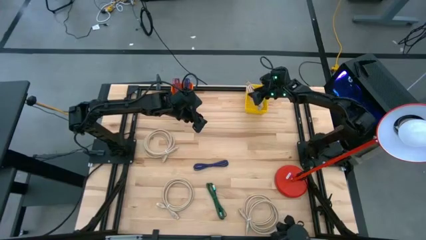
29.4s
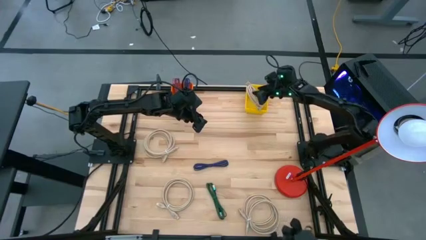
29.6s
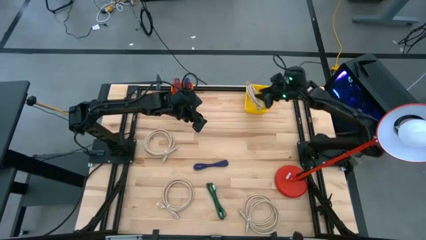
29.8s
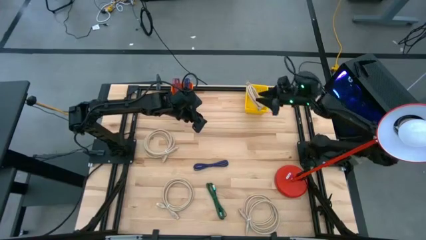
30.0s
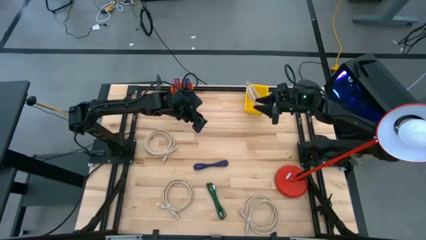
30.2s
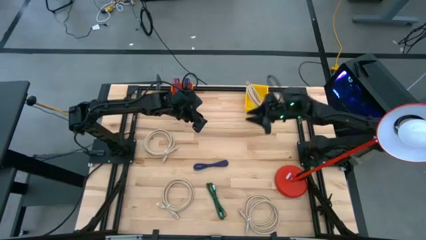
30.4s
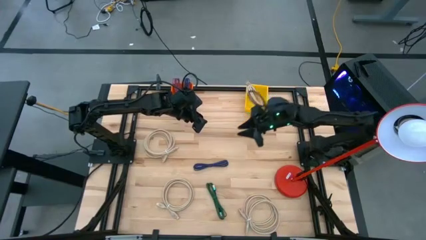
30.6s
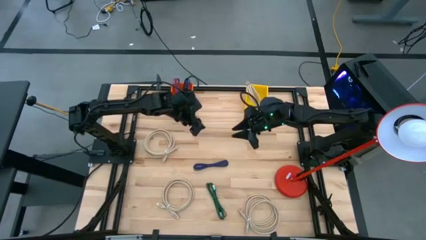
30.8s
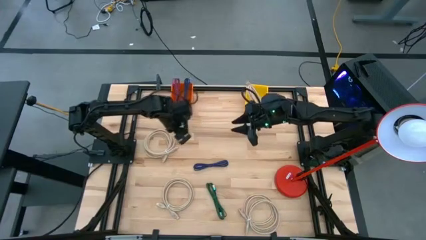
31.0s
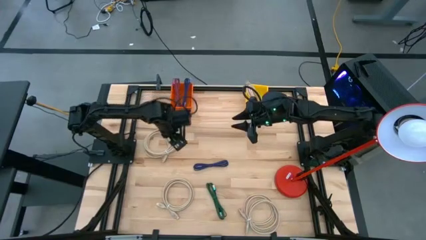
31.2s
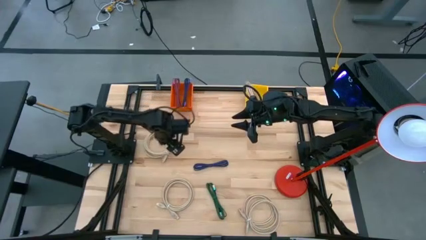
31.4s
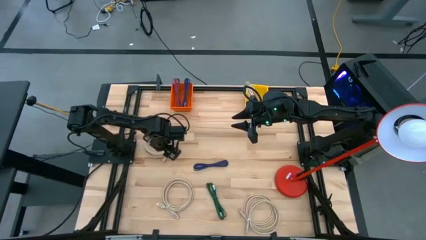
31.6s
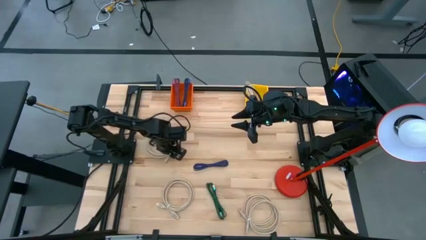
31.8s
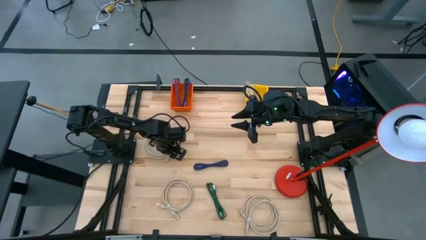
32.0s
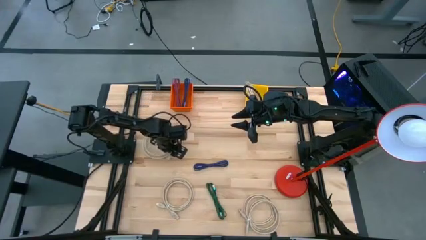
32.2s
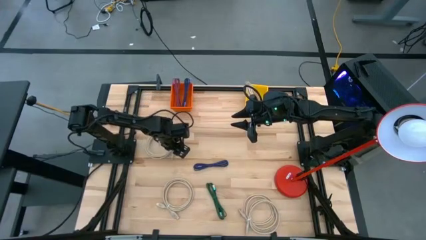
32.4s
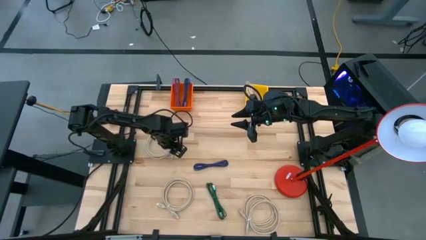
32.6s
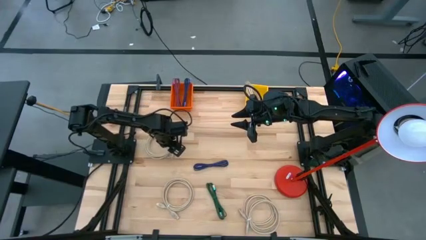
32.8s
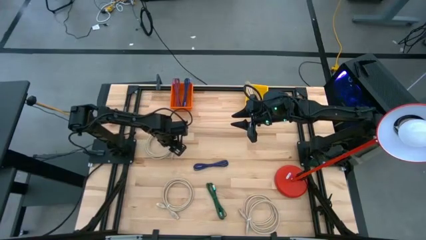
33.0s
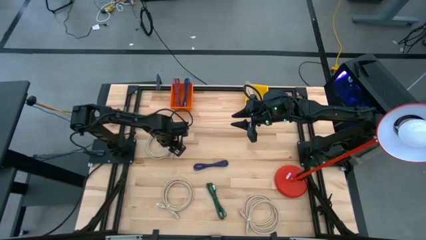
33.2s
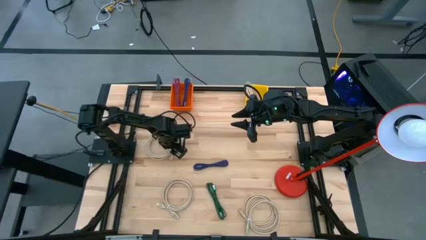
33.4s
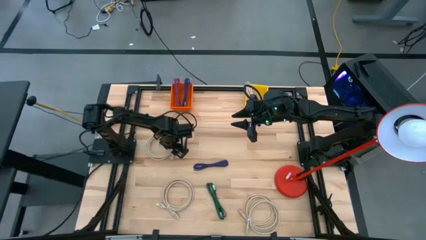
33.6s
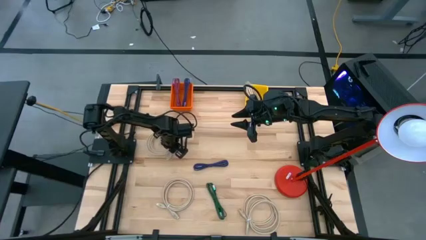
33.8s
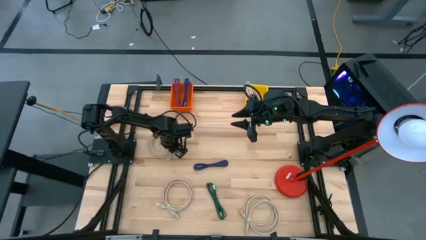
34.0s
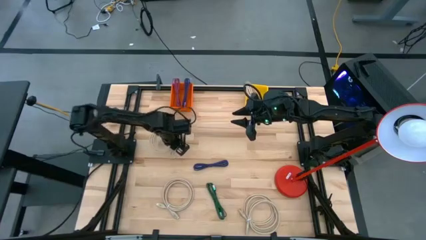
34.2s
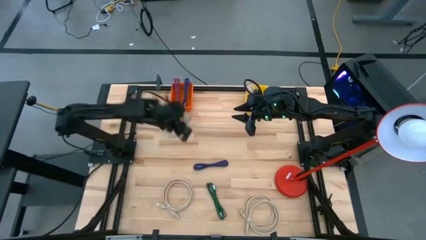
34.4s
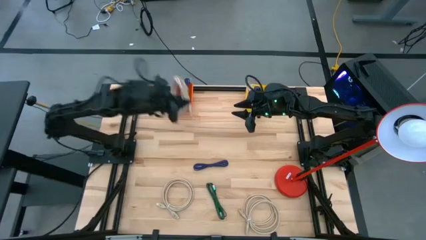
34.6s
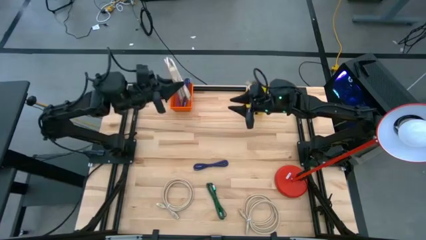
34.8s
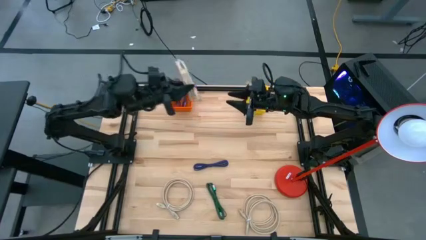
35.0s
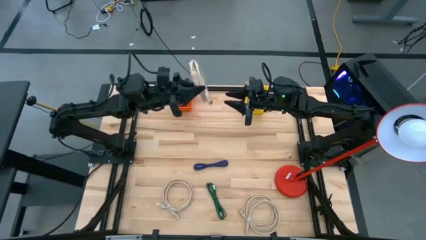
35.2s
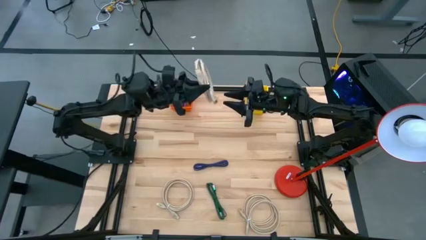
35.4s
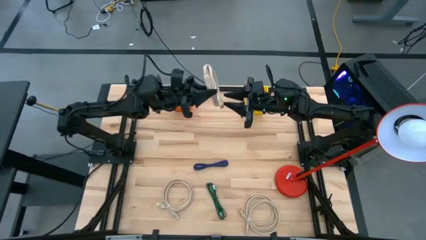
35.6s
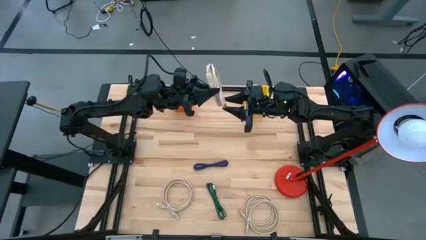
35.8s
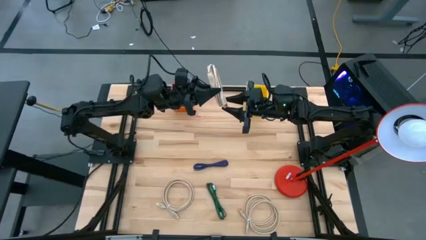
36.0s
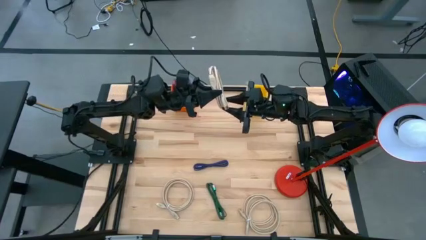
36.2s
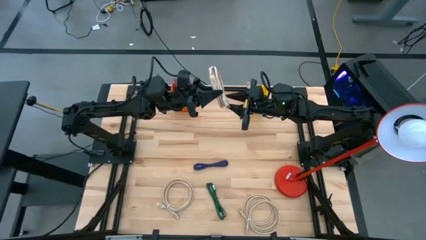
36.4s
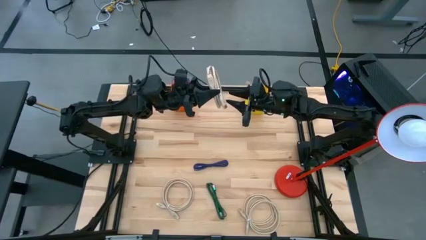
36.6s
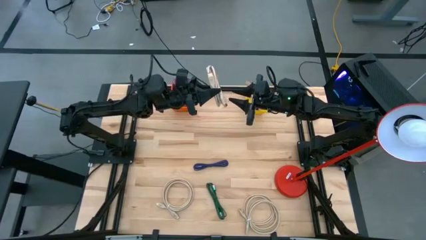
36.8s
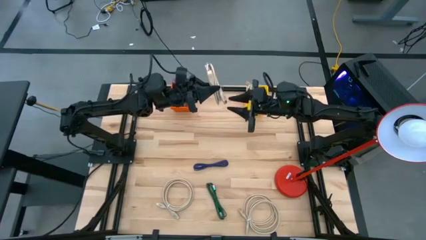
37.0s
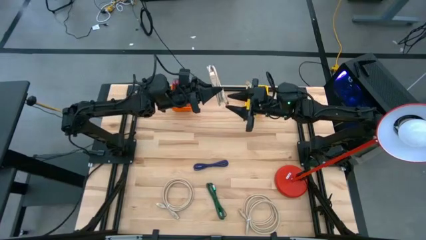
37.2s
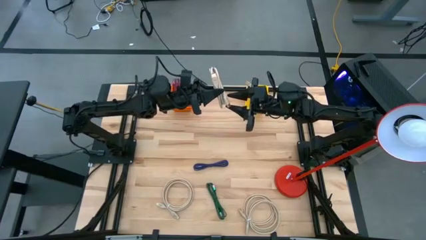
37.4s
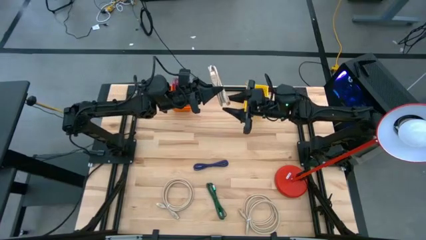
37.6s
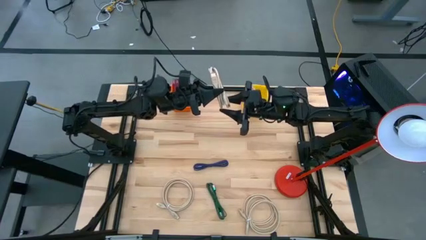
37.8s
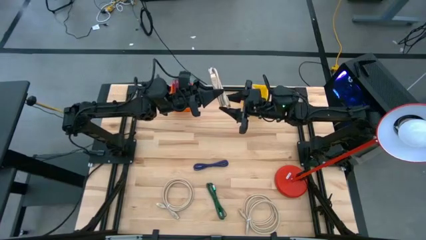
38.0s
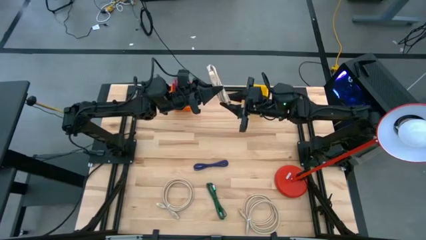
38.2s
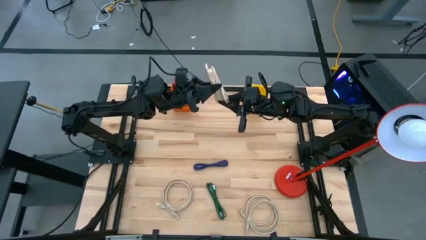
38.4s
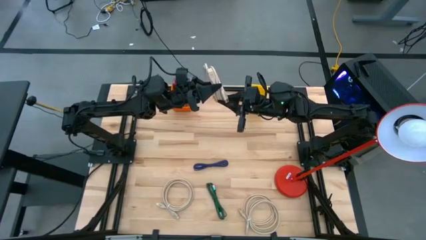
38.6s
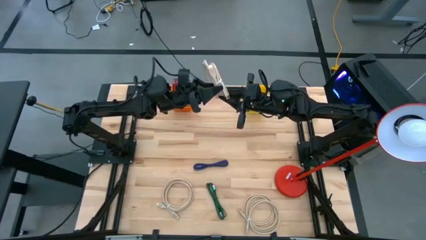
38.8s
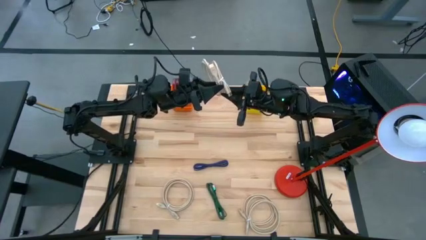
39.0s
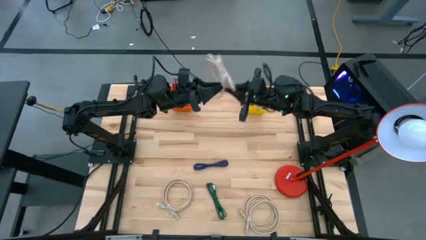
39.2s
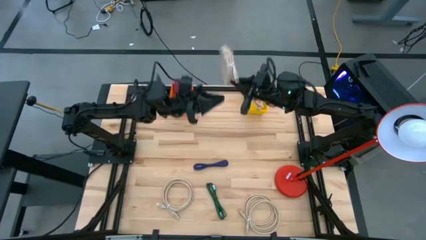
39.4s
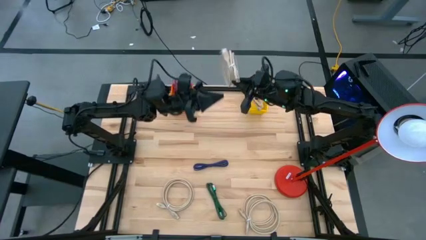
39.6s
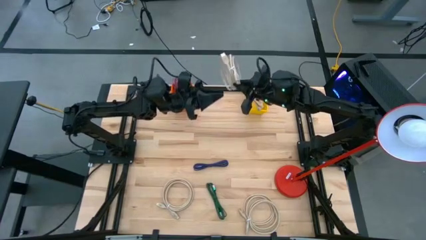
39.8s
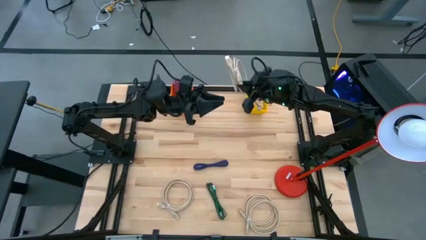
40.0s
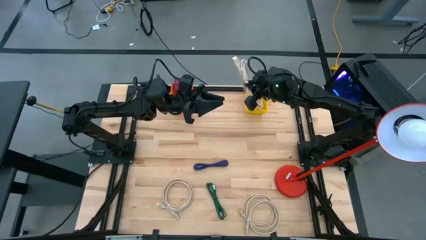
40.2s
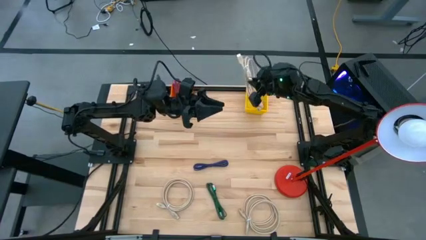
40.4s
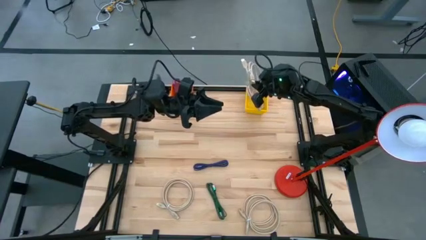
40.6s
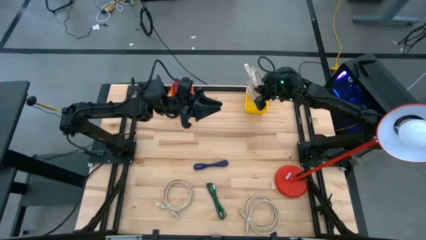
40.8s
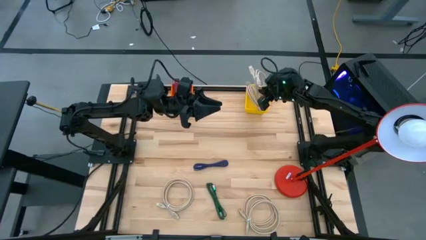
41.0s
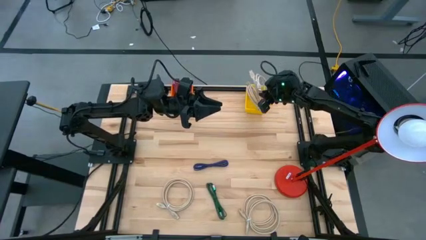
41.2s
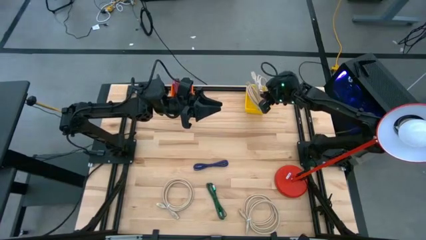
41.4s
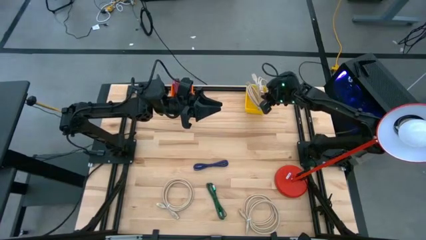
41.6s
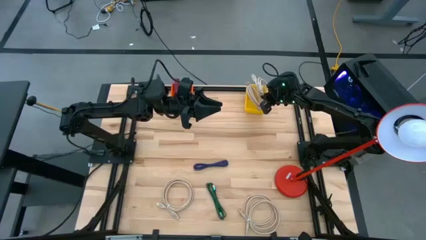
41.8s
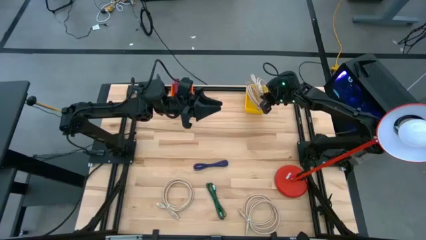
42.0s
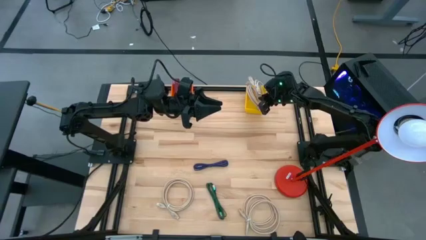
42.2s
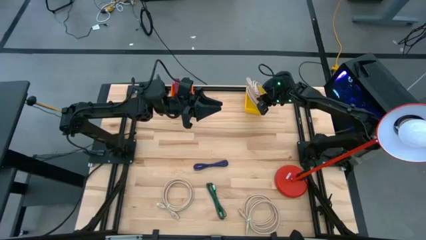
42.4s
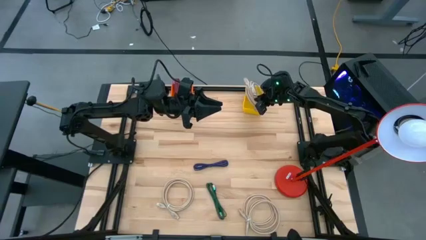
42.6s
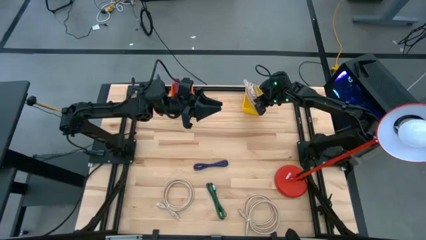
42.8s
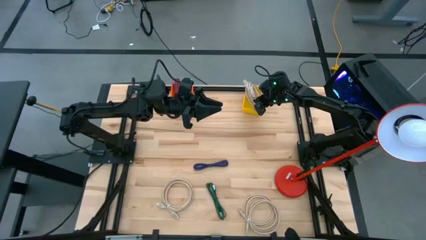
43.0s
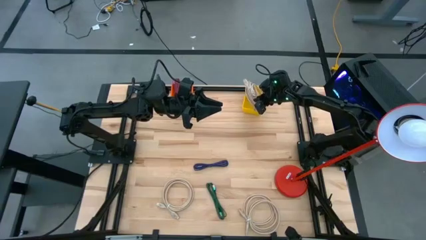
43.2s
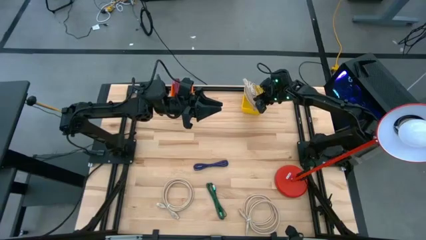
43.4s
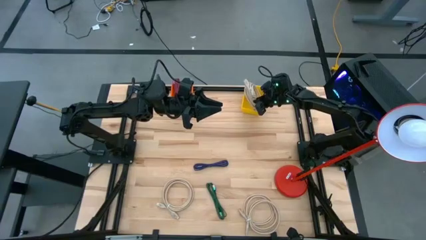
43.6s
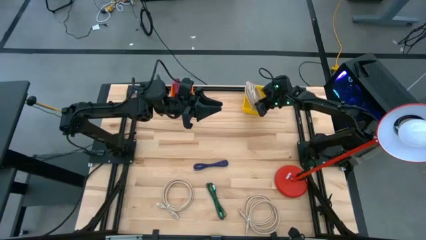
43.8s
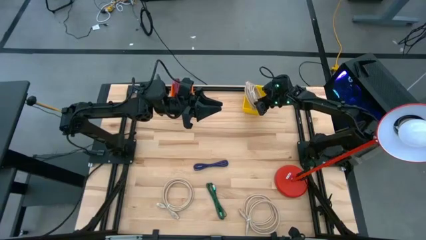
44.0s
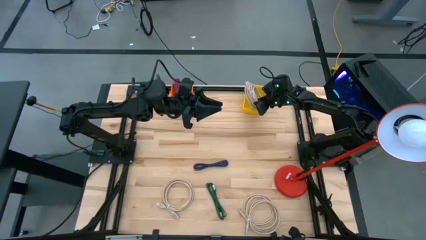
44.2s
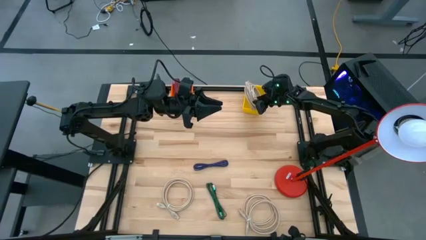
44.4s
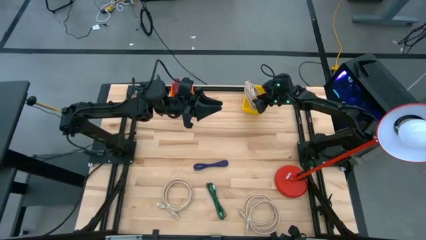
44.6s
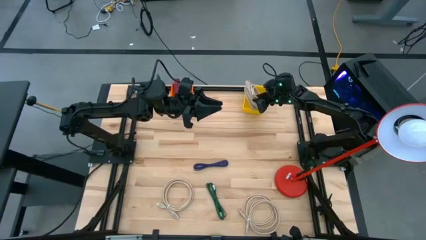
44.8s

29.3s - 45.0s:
Task: Pick & Place USB Port
Put the brown HDMI cable into the yellow bin

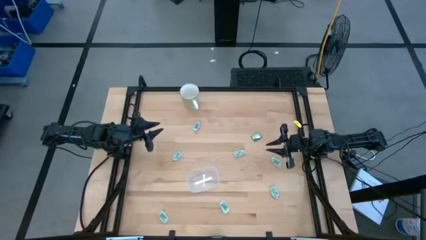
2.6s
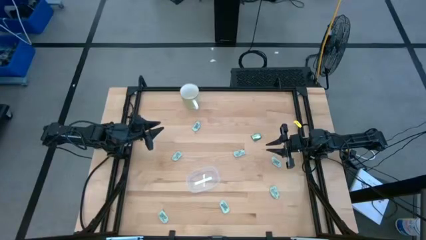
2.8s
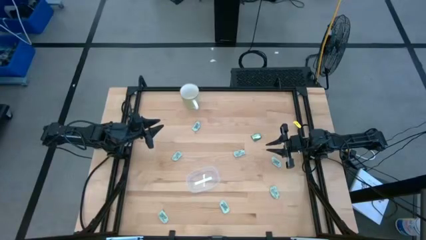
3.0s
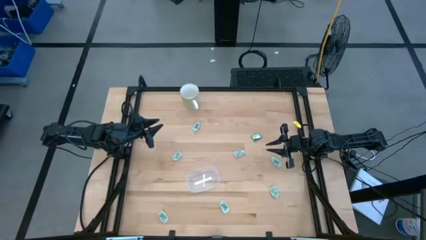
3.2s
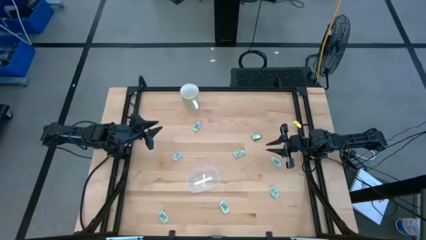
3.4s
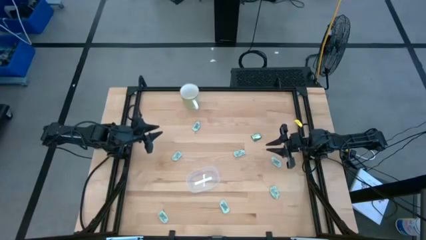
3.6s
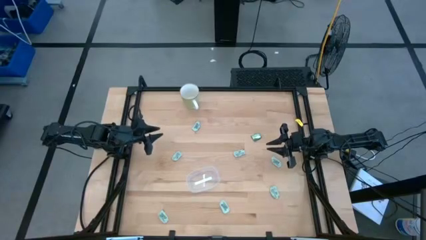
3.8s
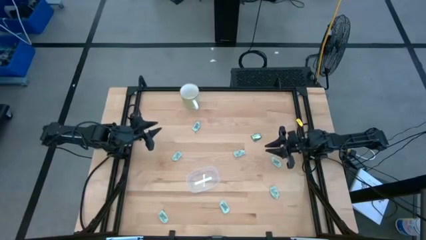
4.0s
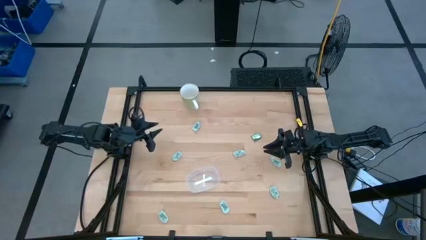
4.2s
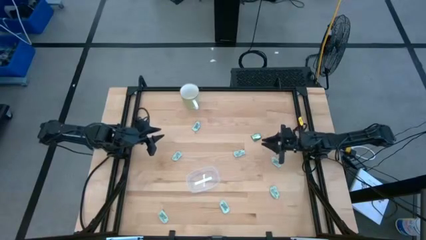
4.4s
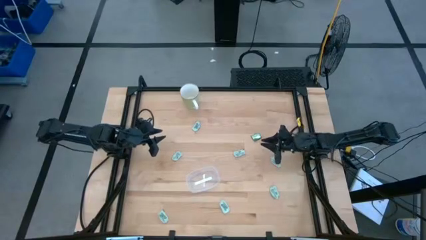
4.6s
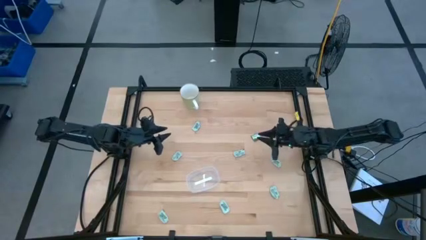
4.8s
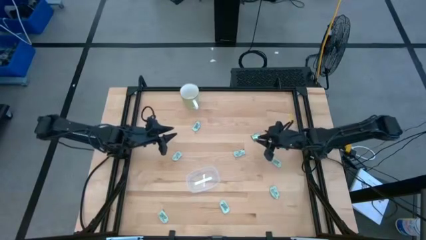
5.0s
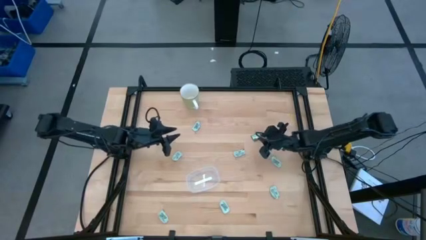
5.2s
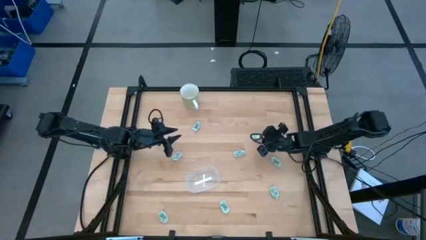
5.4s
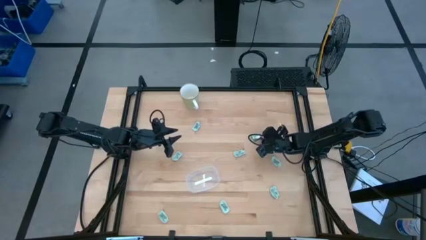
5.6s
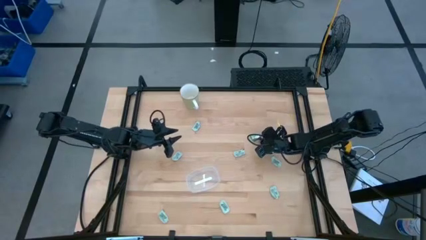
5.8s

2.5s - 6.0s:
Task: Pick and place Stevia / Truvia into bins
Put the green truvia packet into the transparent bin
